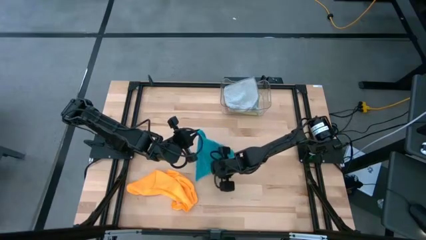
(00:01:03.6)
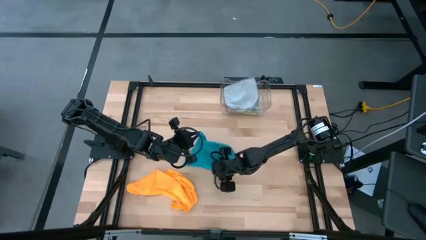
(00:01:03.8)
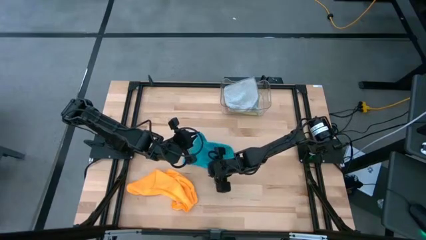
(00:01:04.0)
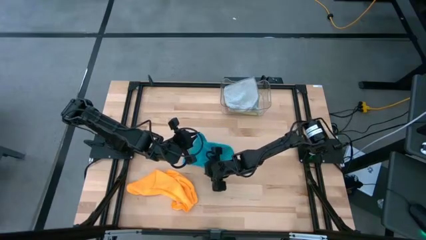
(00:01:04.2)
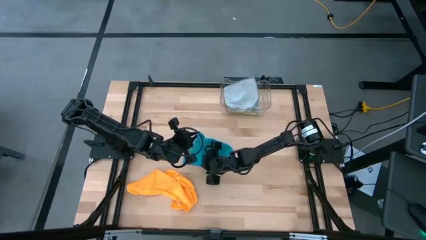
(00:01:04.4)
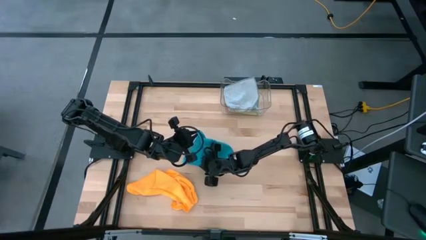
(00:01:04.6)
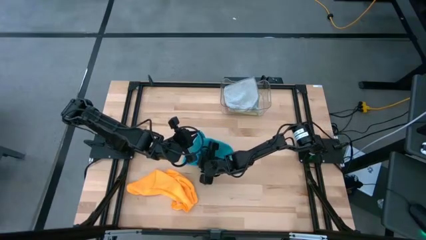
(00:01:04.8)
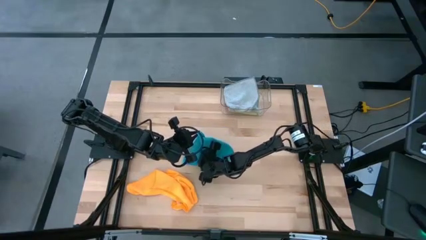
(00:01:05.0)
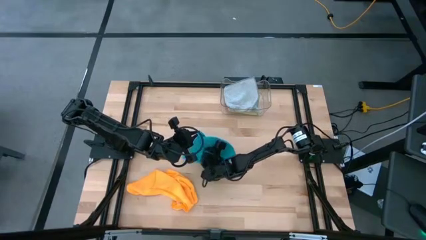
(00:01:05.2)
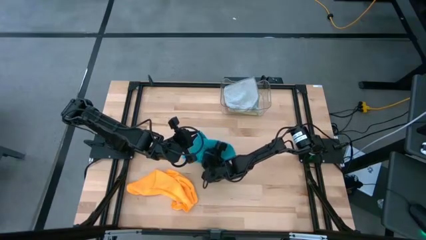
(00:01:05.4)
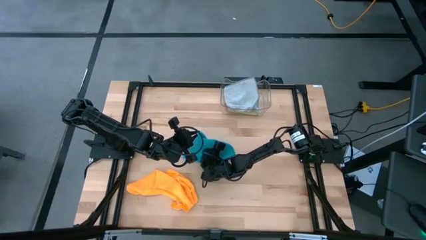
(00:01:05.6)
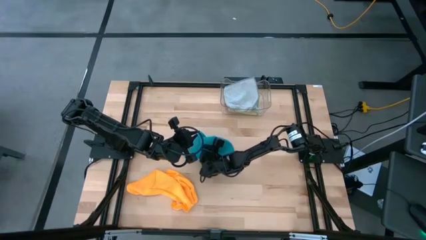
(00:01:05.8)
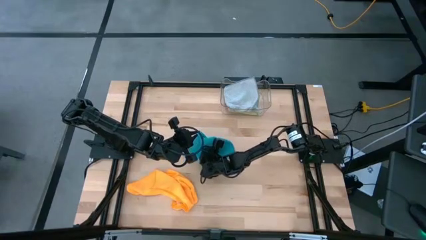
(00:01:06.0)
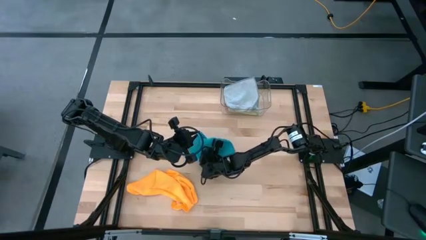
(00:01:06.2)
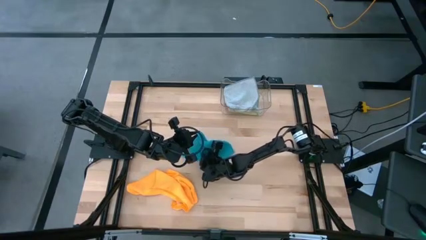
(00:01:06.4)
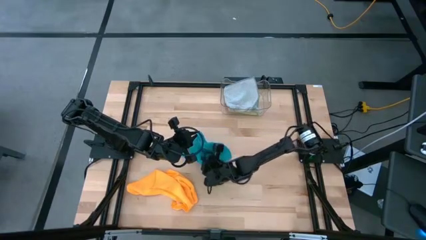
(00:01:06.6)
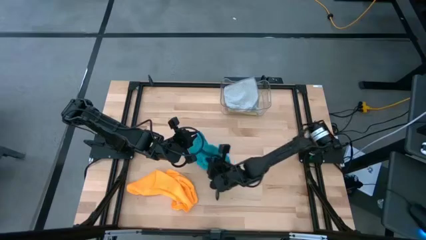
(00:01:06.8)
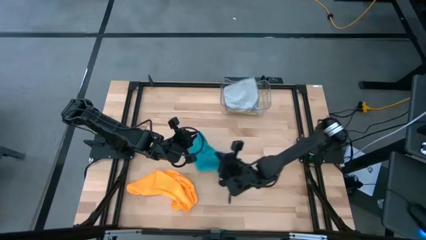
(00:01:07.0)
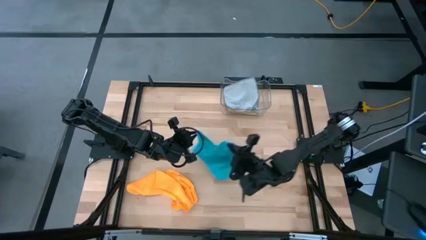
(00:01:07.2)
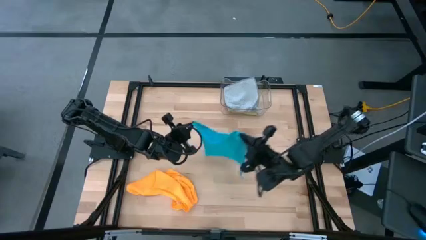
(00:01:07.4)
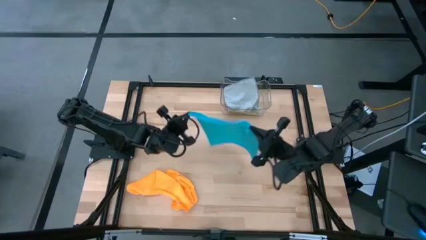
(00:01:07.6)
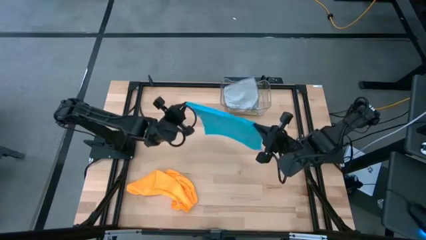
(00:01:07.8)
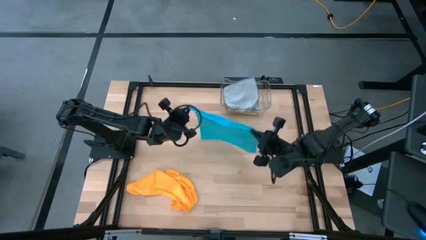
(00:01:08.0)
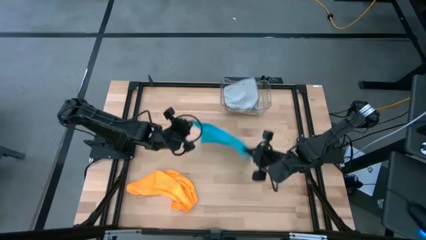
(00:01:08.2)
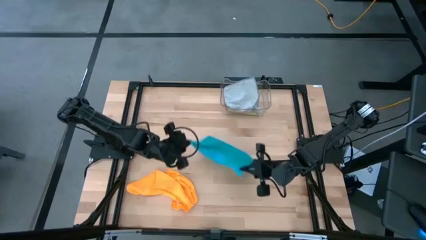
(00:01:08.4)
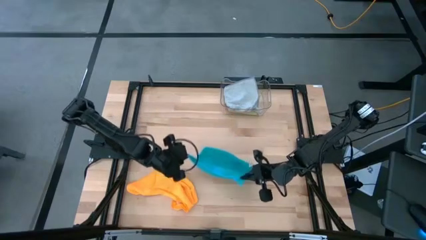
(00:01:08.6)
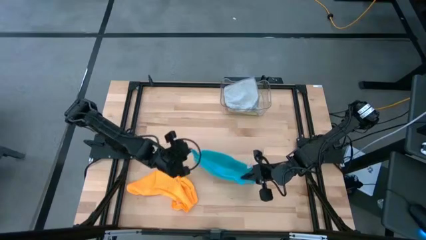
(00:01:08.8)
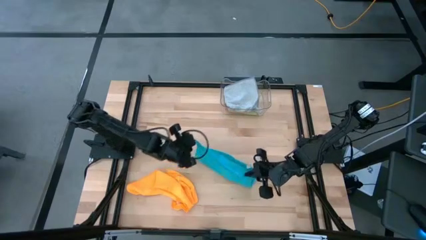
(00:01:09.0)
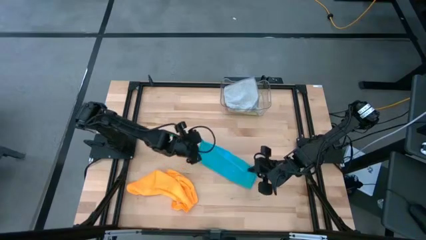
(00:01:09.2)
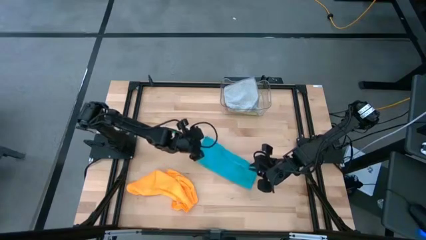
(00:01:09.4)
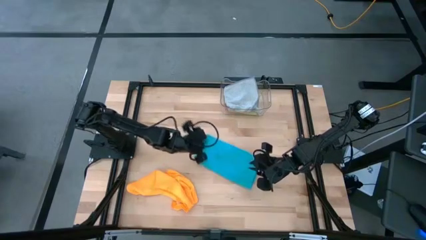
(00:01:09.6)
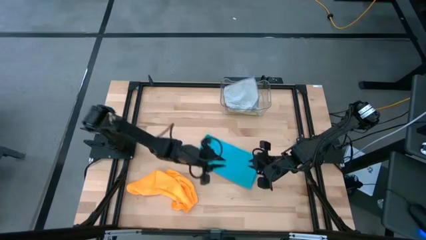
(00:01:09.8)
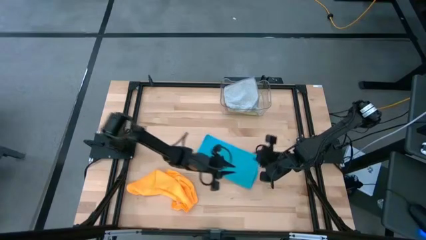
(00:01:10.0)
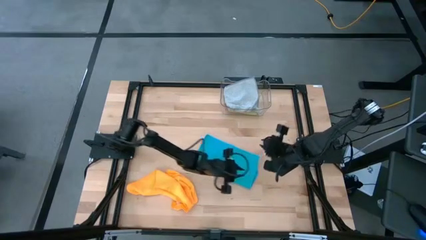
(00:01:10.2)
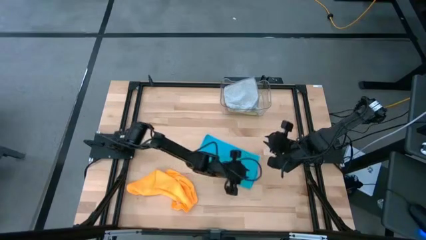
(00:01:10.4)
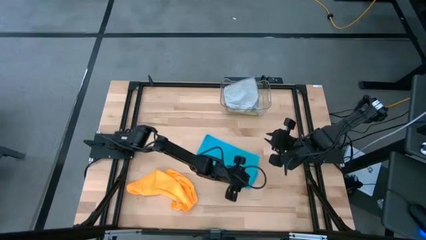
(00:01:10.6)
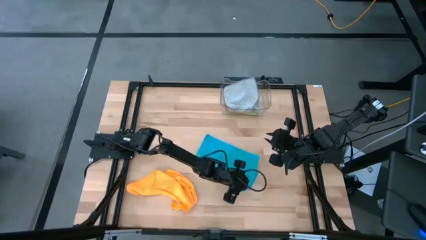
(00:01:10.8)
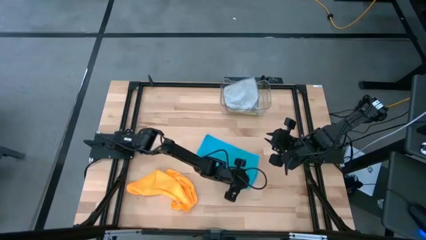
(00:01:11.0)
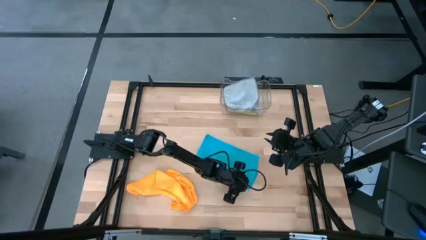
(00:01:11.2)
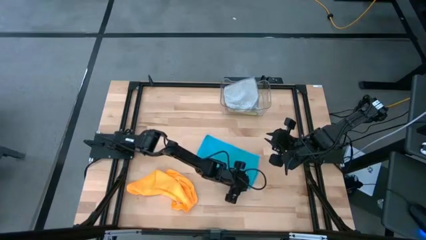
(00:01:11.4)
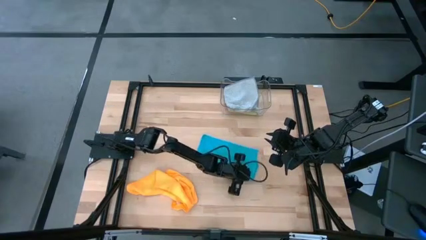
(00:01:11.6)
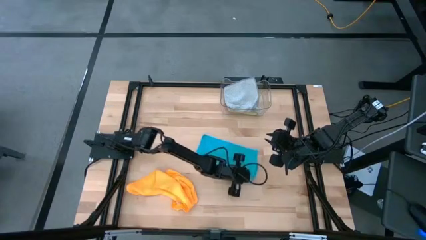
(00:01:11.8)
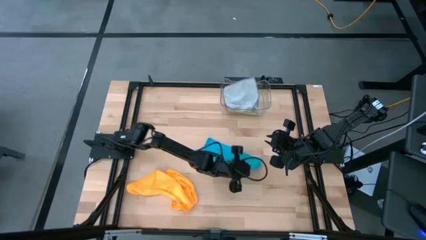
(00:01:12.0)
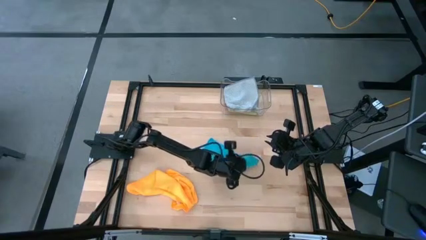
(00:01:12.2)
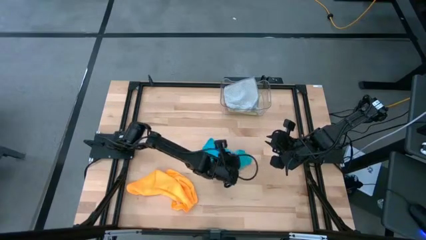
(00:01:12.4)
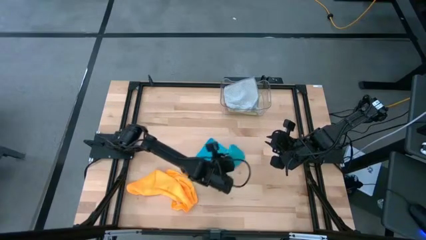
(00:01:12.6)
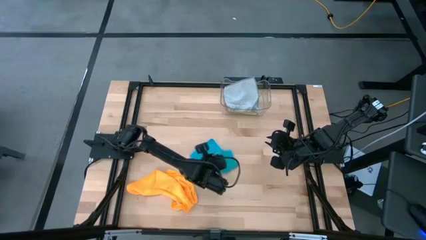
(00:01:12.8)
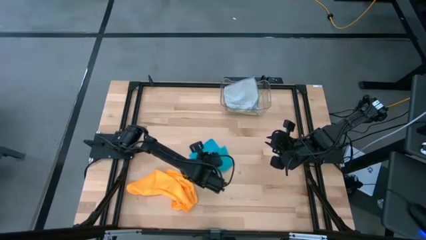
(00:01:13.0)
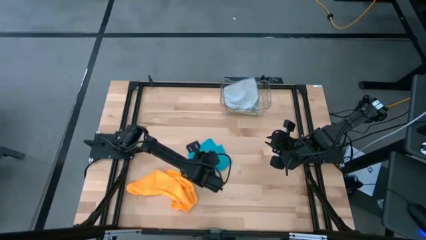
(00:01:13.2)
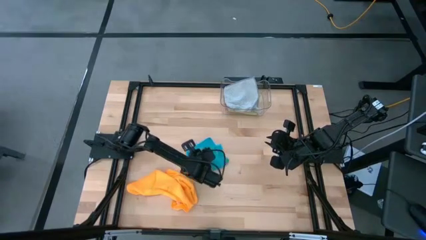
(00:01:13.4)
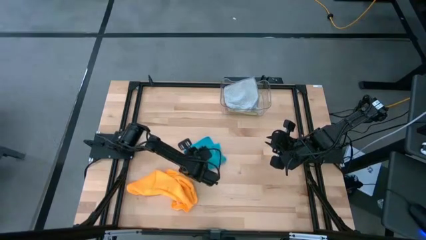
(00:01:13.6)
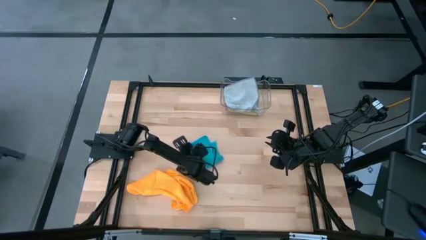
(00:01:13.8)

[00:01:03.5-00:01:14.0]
Task: Fold microfiber towels
Fold the blue microfiber towel

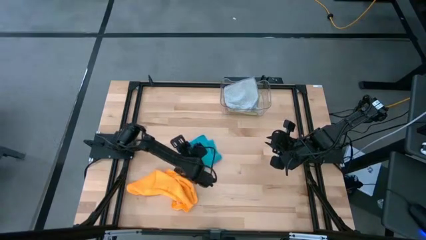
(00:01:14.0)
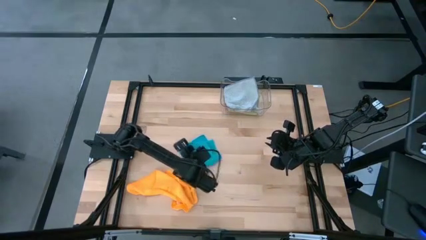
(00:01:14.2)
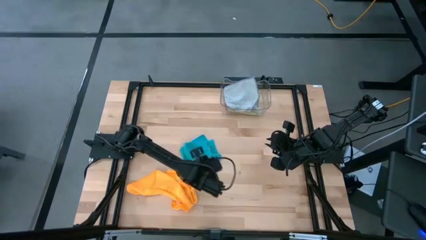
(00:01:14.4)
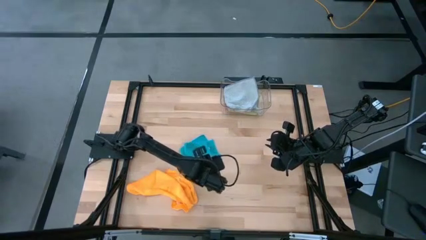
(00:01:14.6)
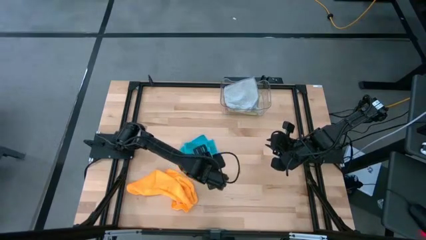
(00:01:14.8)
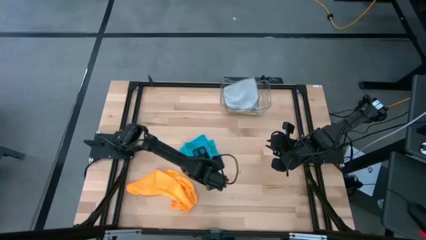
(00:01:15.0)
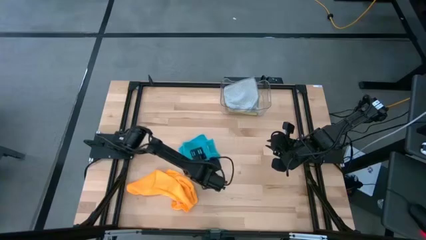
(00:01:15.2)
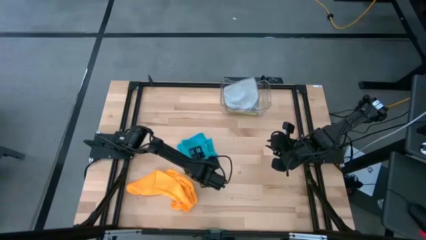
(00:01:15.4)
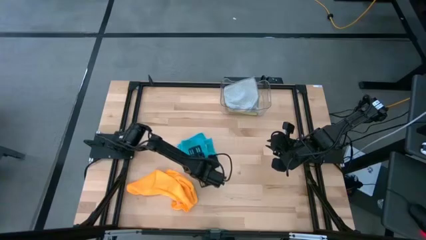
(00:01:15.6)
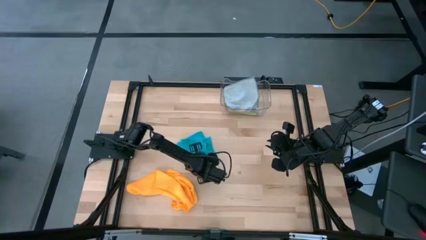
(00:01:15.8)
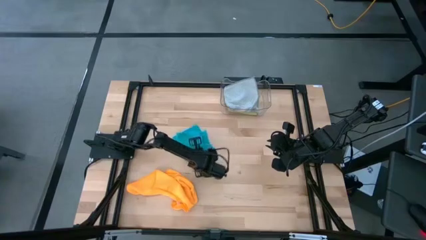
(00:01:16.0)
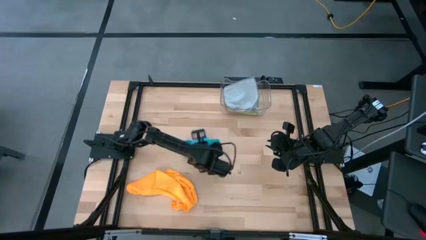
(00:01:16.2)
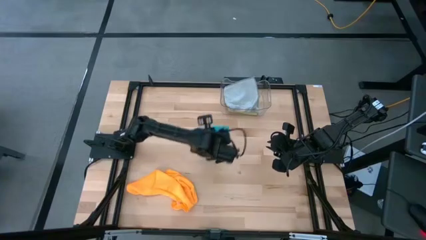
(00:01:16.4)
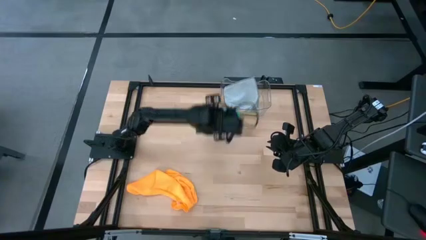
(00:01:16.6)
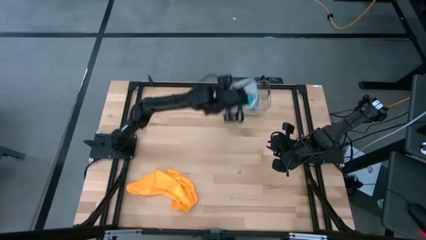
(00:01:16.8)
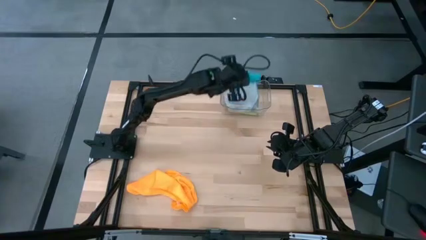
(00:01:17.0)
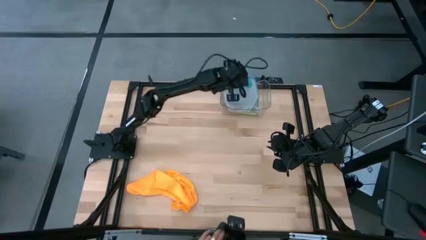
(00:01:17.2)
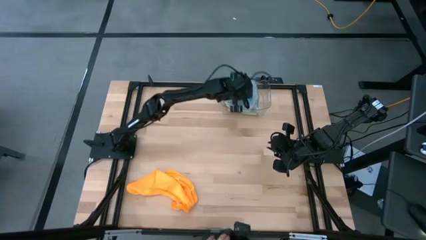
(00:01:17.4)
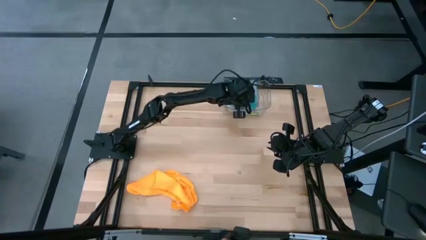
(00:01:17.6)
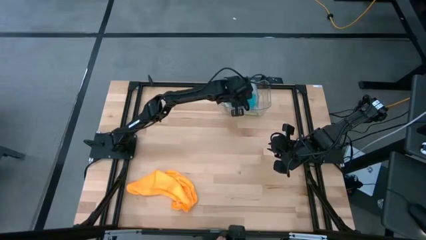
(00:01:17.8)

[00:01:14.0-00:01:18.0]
Put the blue microfiber towel into the transparent bin
